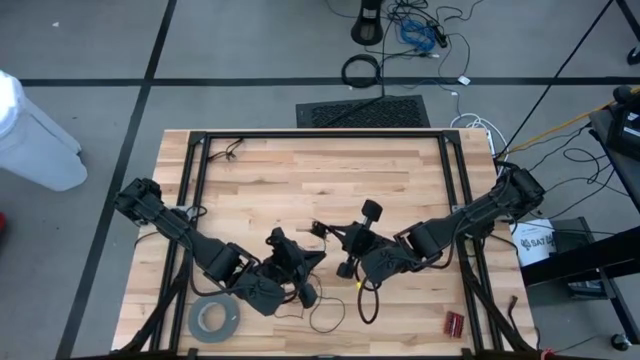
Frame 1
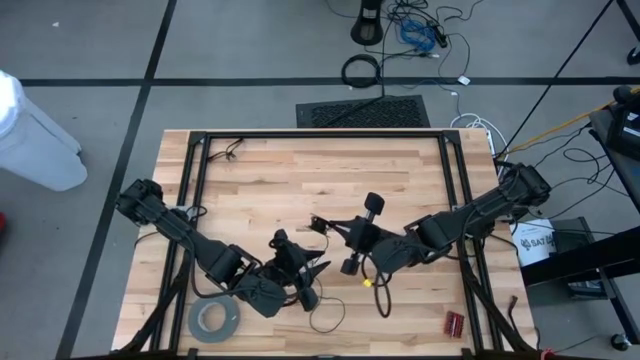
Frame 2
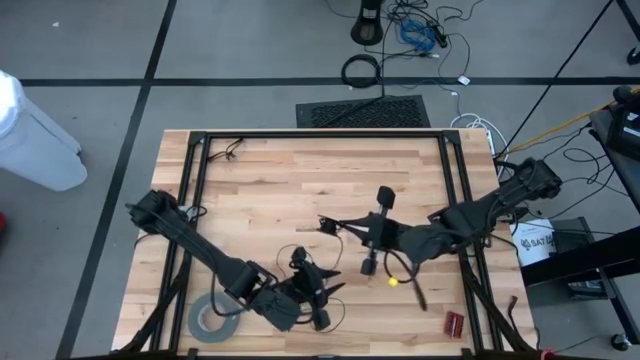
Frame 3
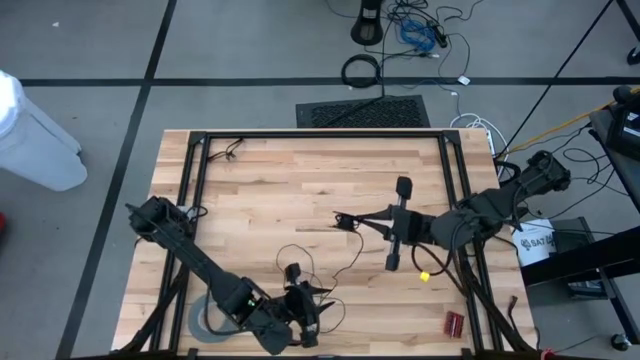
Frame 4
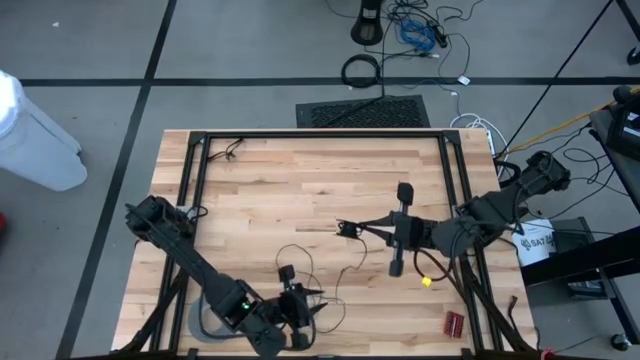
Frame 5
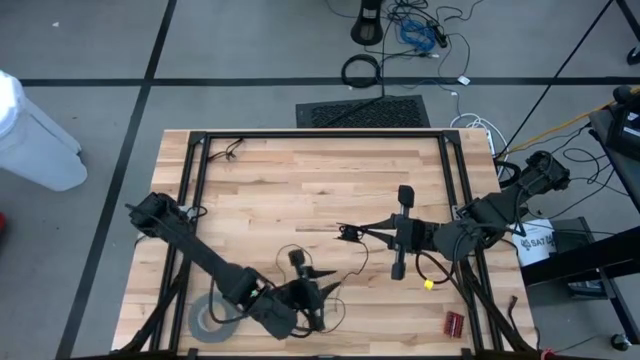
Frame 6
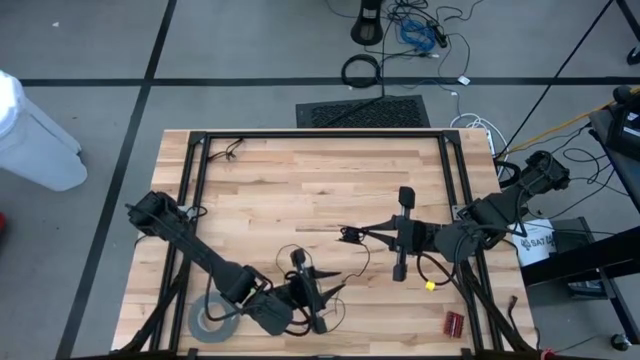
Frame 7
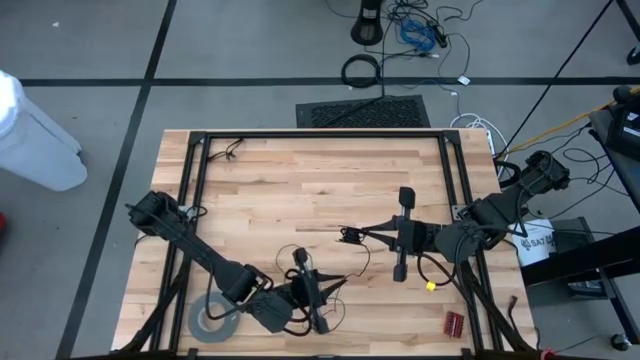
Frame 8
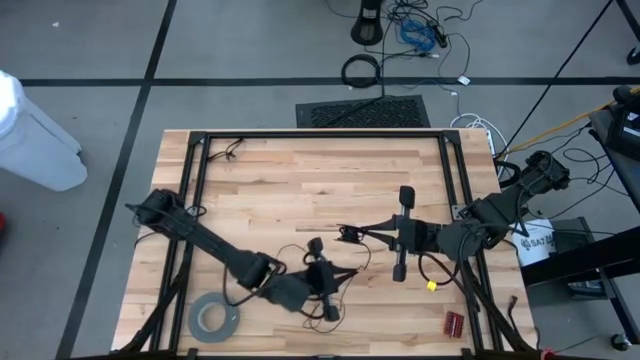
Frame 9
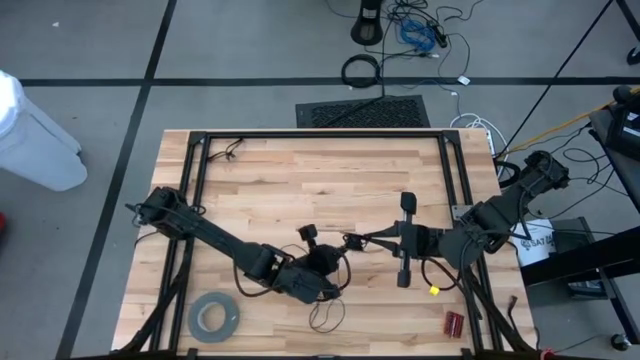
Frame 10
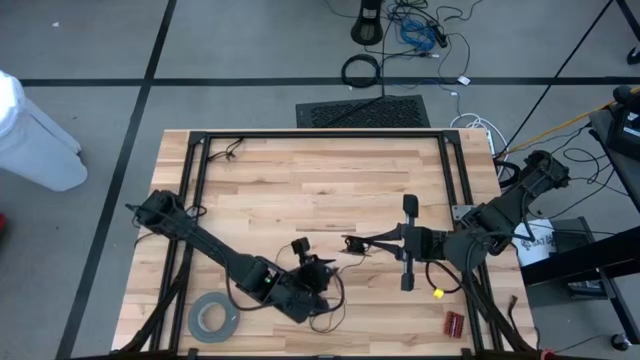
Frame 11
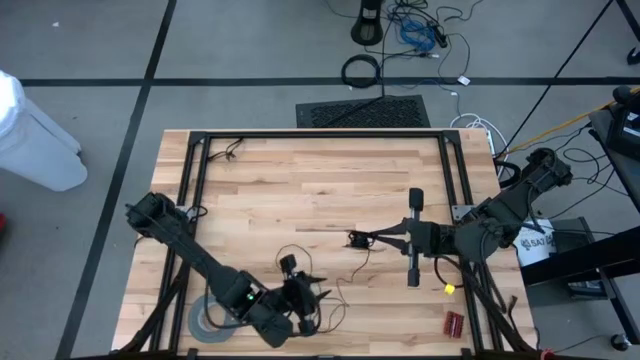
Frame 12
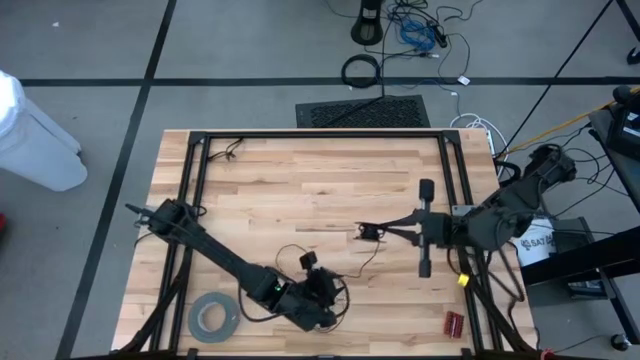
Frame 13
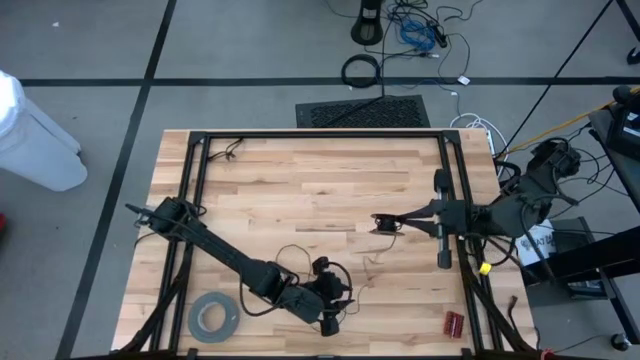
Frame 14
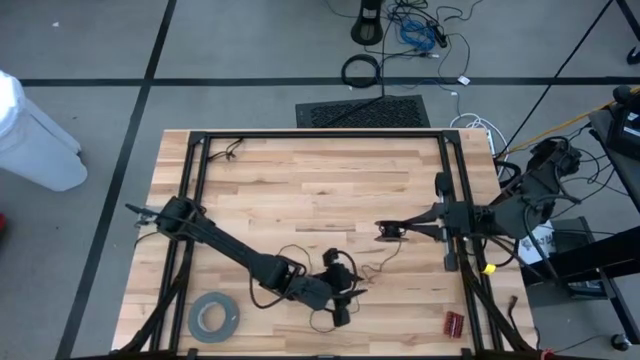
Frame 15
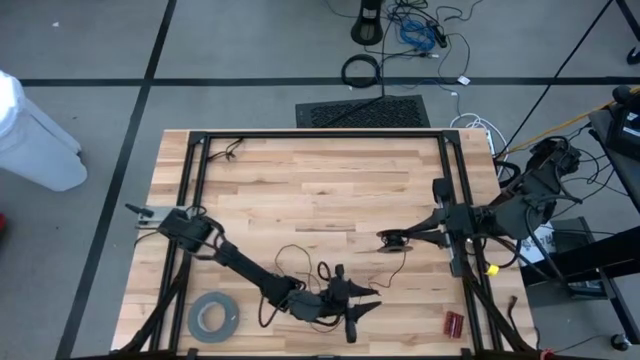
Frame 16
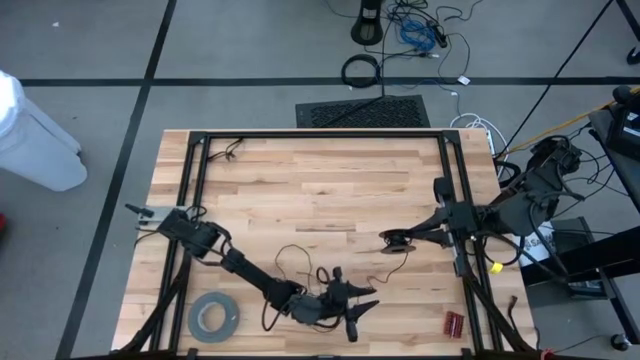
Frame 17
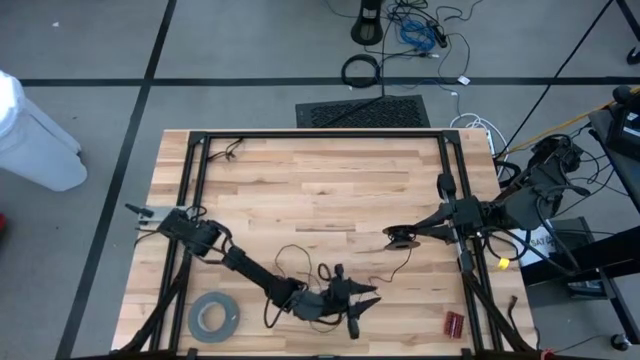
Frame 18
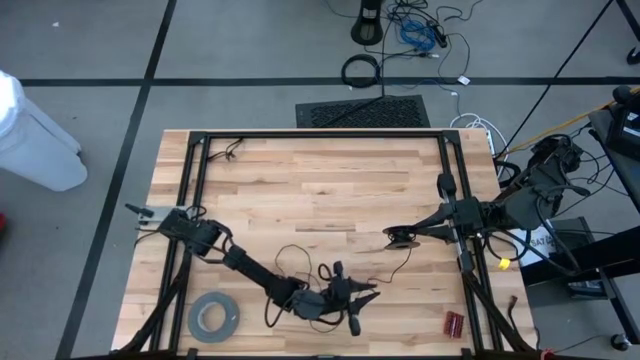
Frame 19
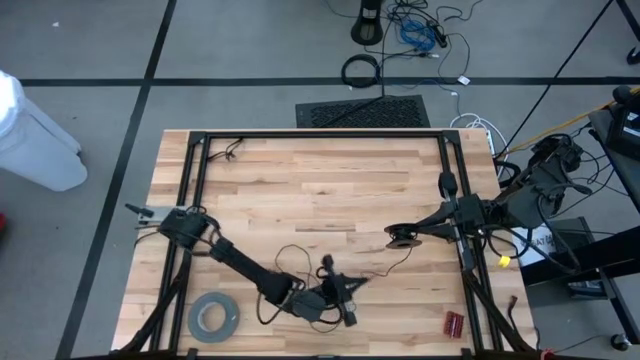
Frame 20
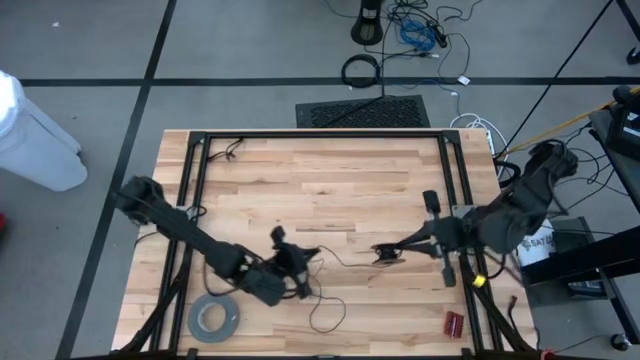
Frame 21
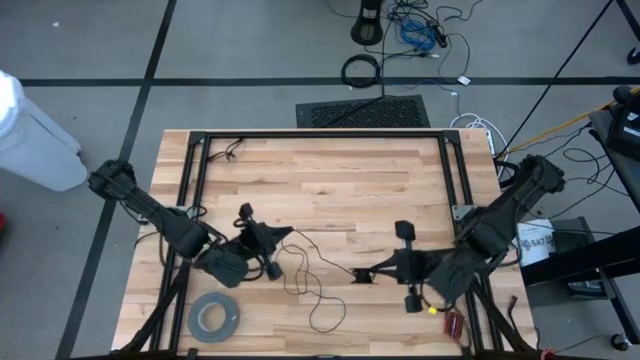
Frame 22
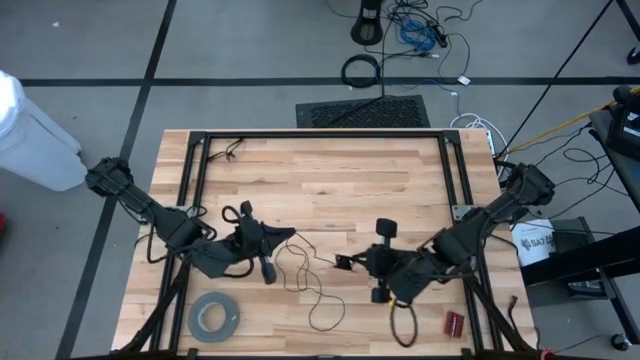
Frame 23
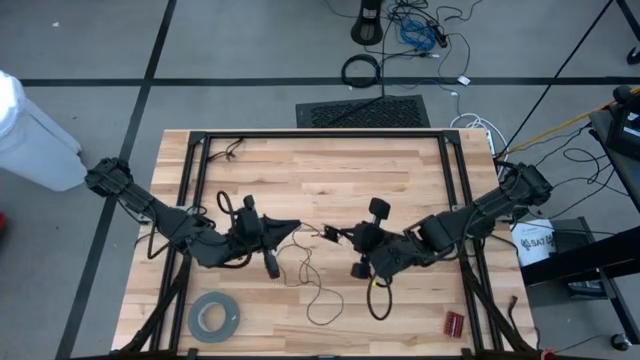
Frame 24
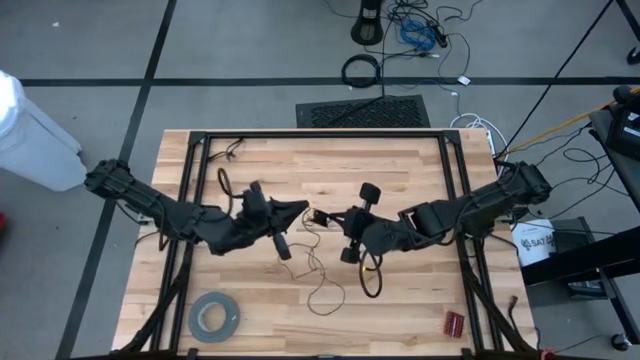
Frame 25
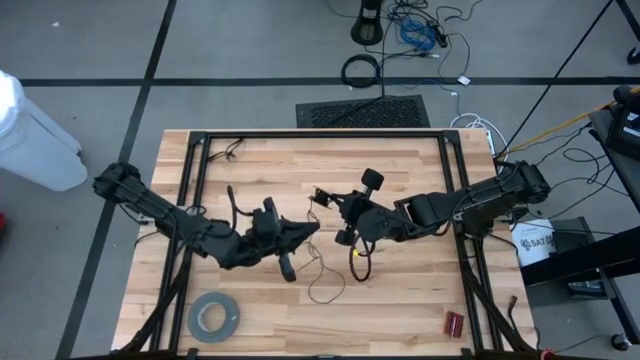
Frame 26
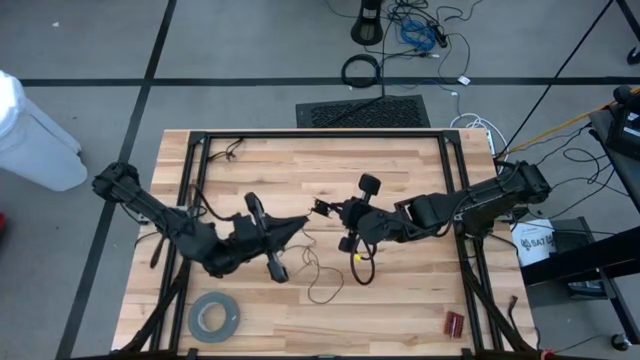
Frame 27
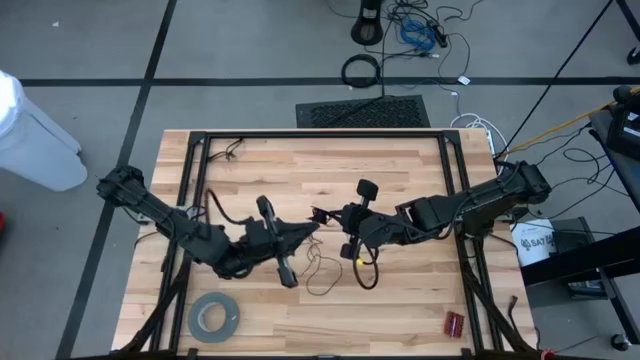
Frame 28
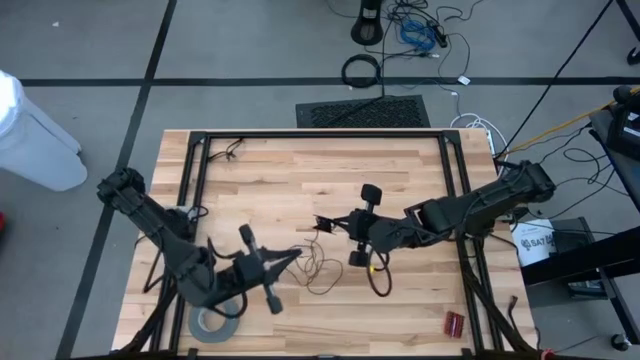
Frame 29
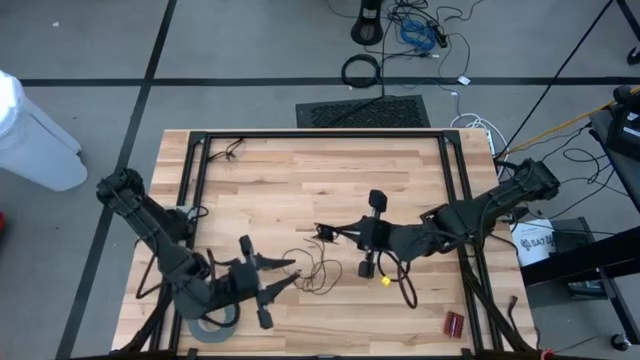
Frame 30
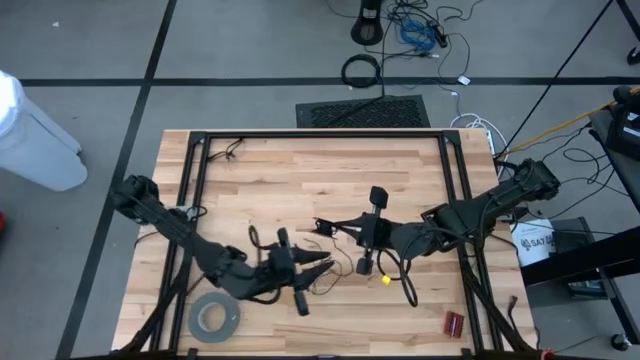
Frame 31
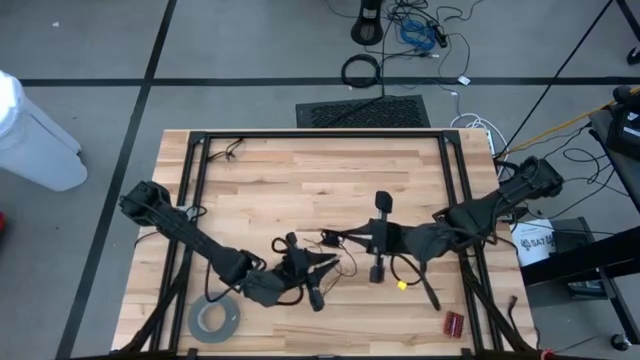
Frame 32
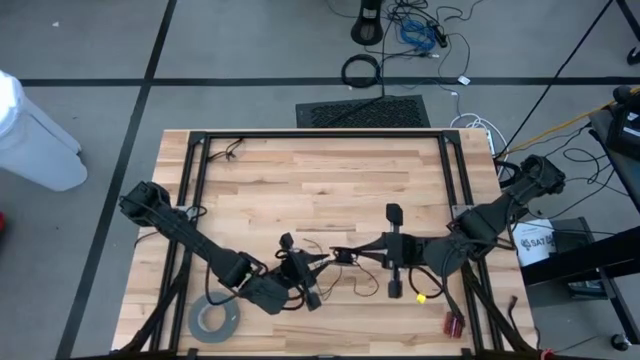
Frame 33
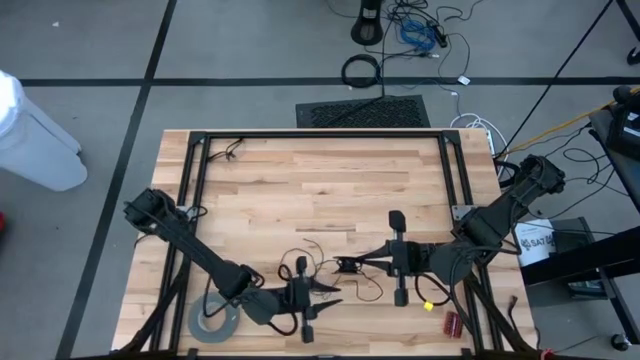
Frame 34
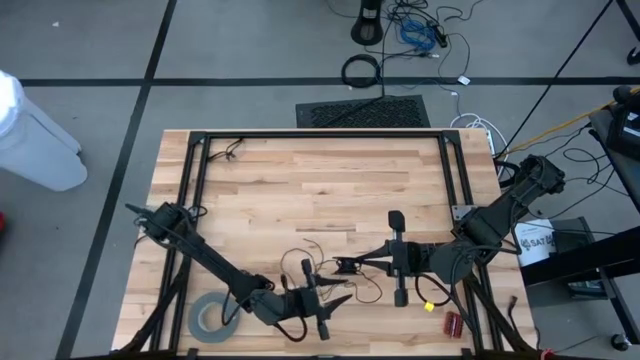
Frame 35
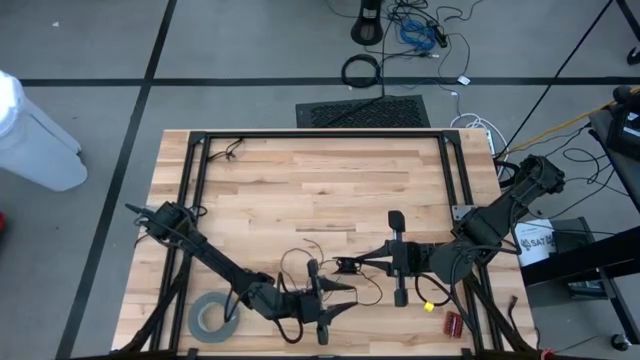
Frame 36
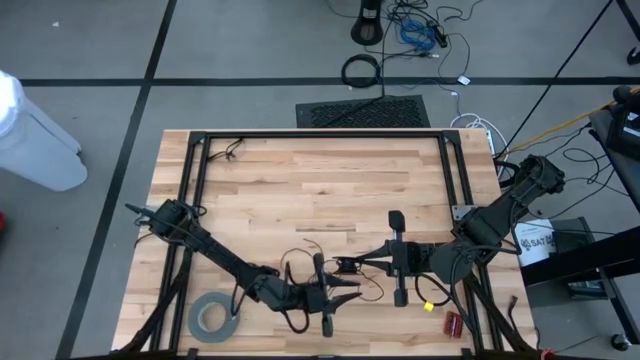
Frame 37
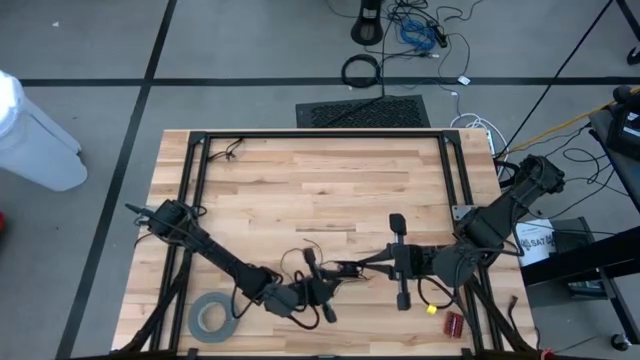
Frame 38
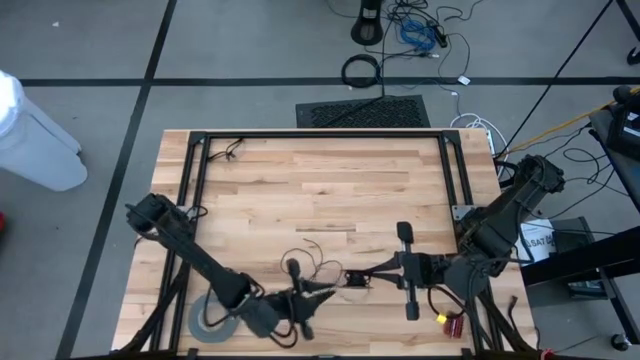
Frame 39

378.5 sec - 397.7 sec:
Task: Coil cords
Coil the black wire onto the spool
